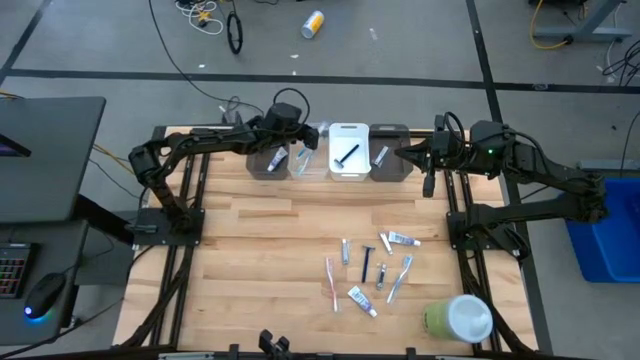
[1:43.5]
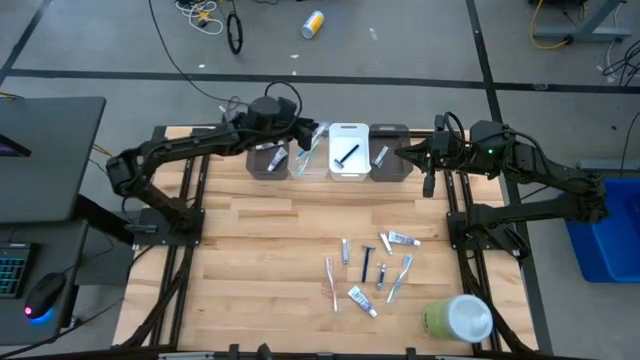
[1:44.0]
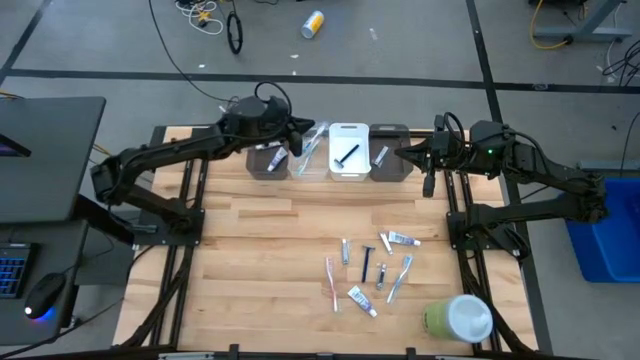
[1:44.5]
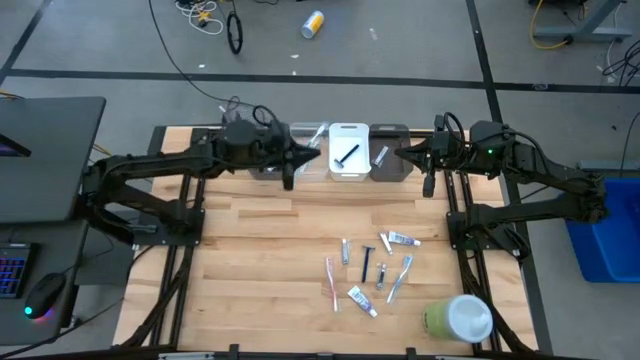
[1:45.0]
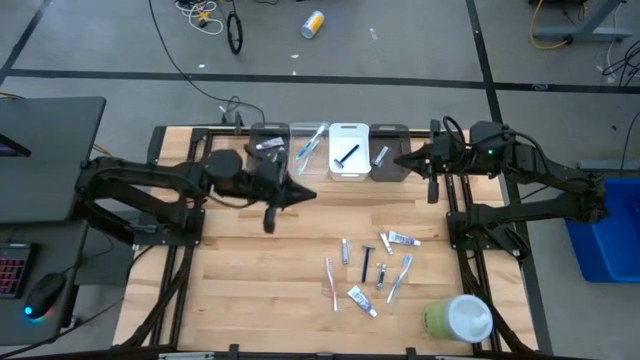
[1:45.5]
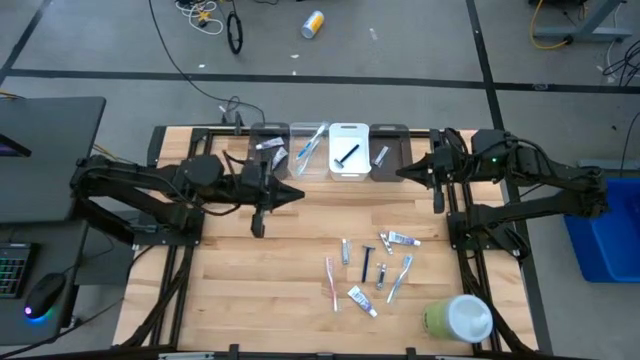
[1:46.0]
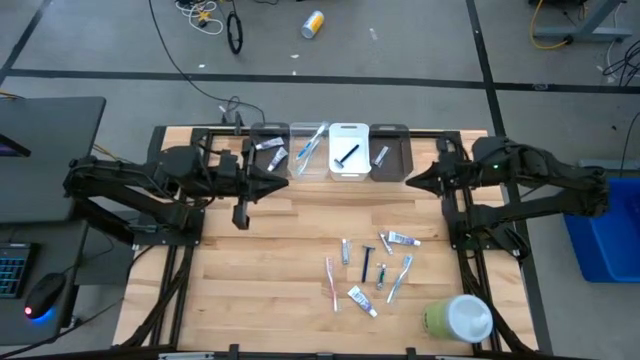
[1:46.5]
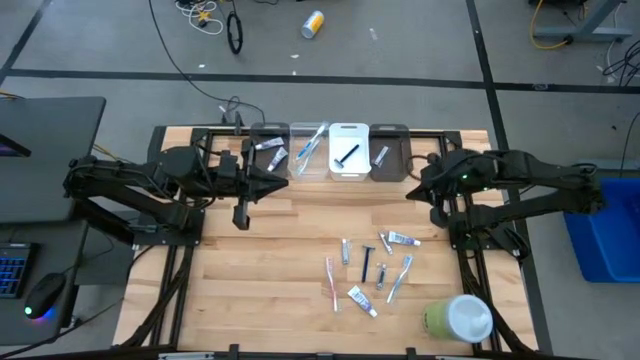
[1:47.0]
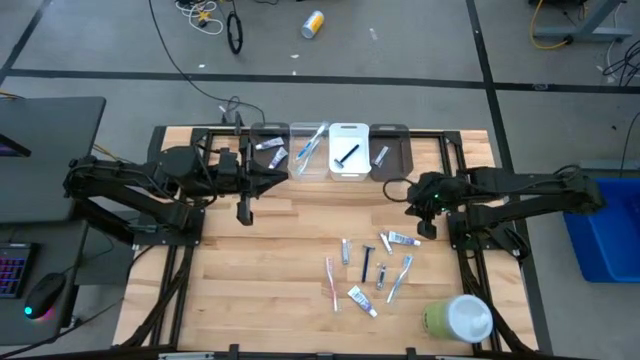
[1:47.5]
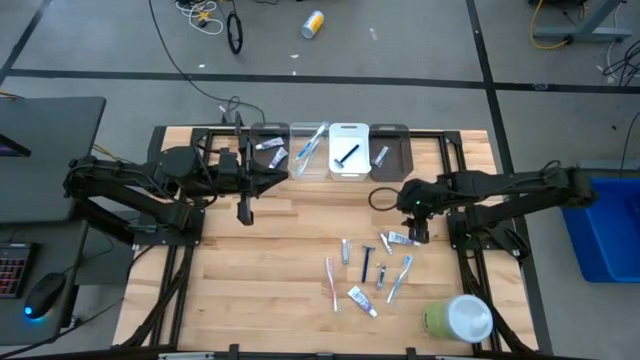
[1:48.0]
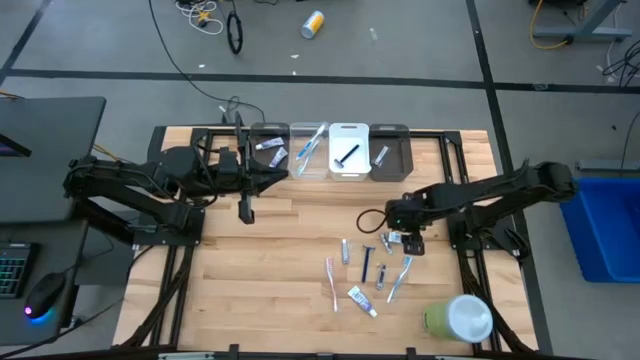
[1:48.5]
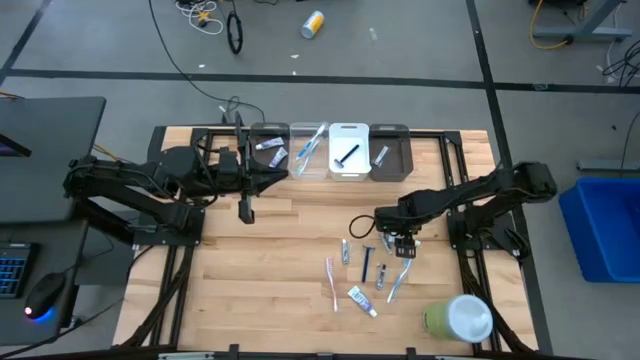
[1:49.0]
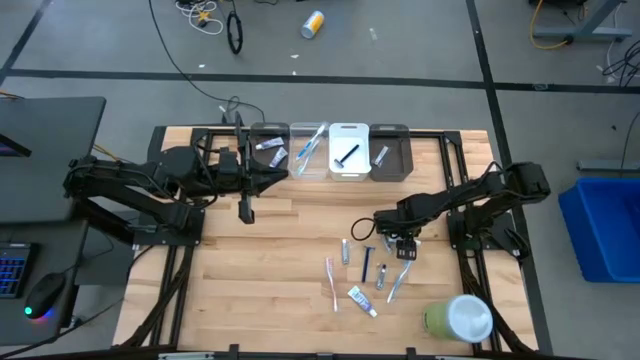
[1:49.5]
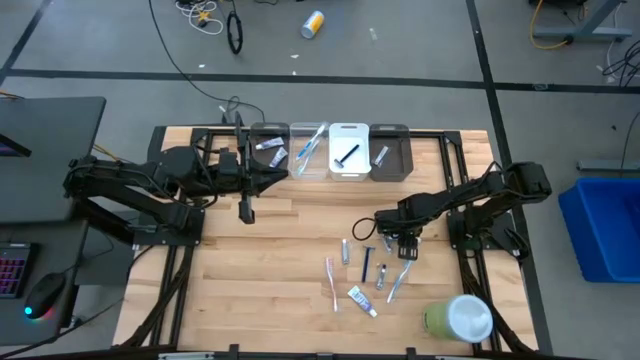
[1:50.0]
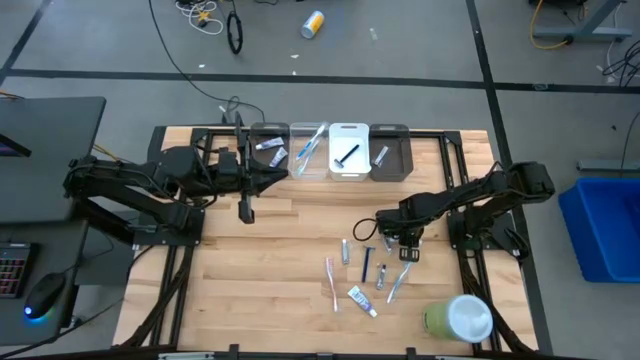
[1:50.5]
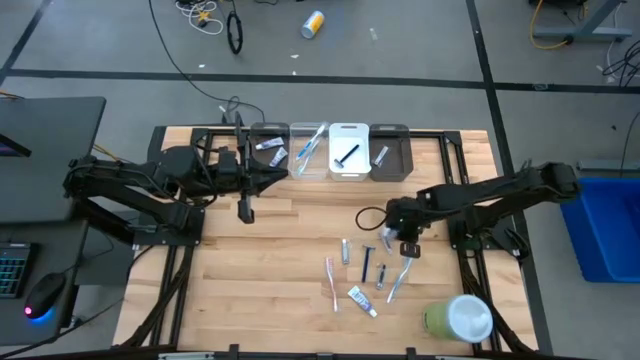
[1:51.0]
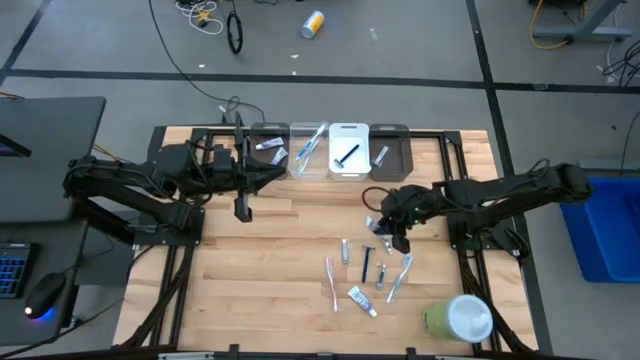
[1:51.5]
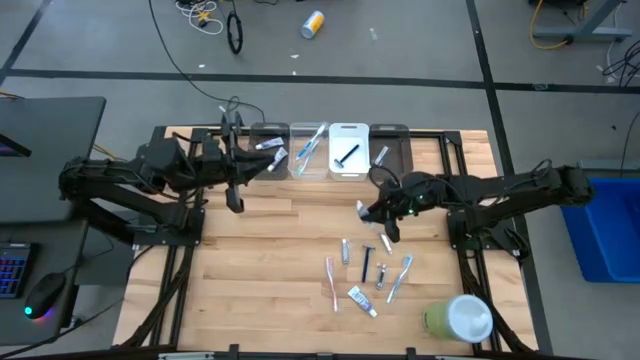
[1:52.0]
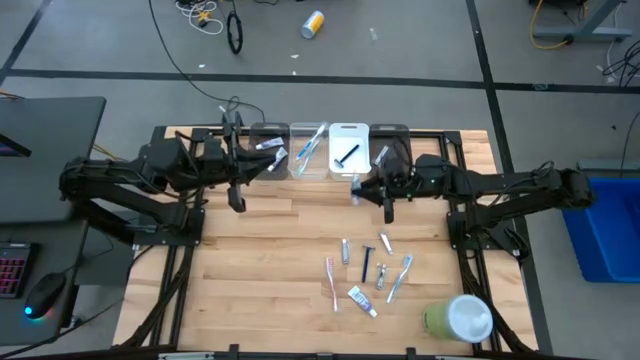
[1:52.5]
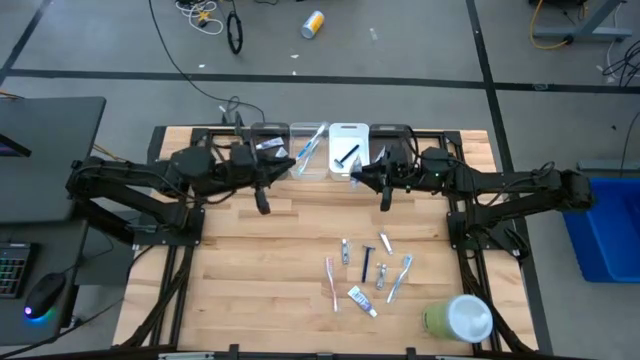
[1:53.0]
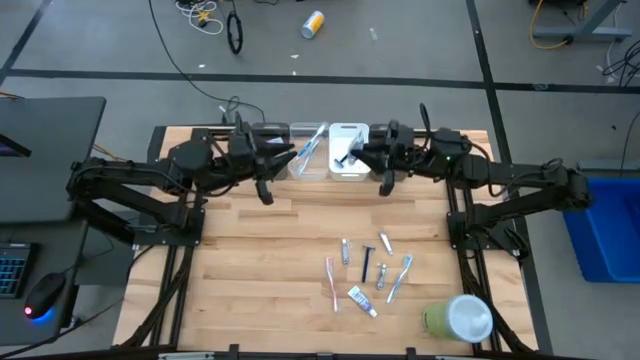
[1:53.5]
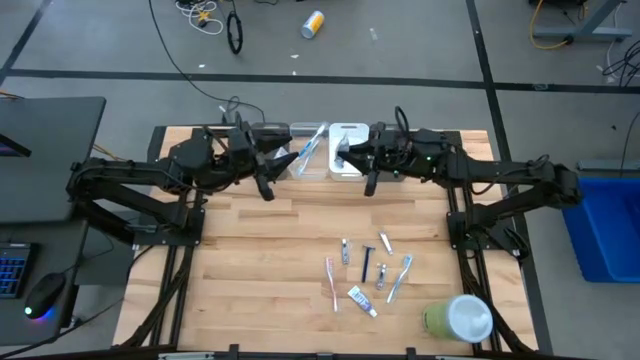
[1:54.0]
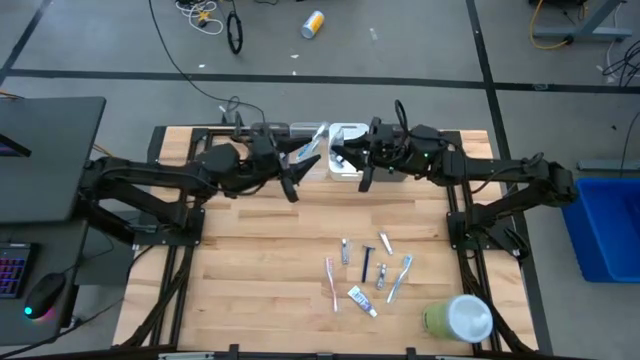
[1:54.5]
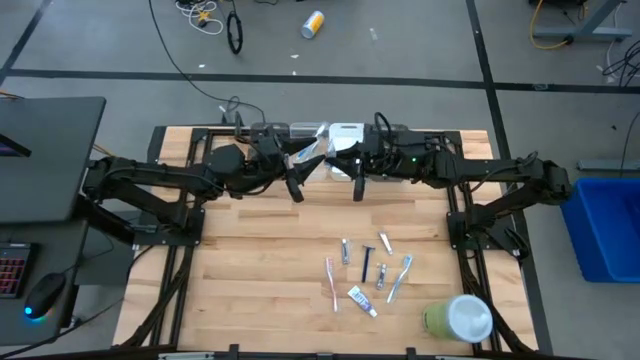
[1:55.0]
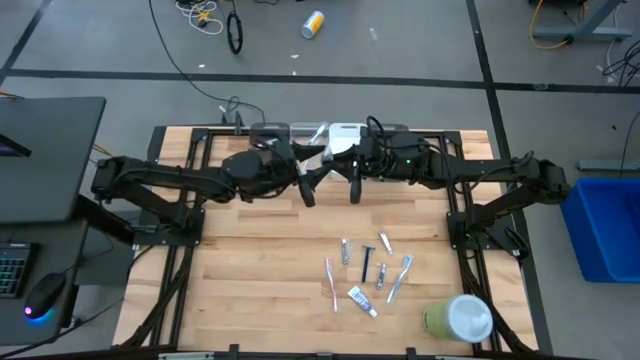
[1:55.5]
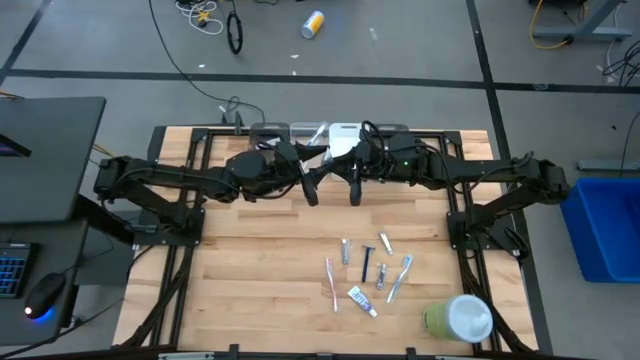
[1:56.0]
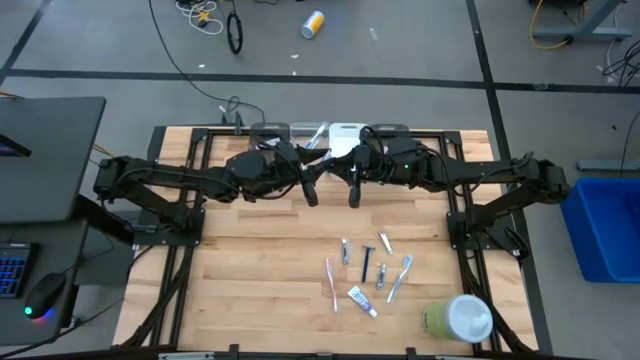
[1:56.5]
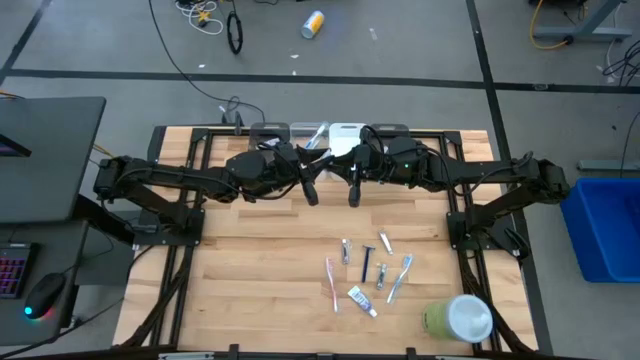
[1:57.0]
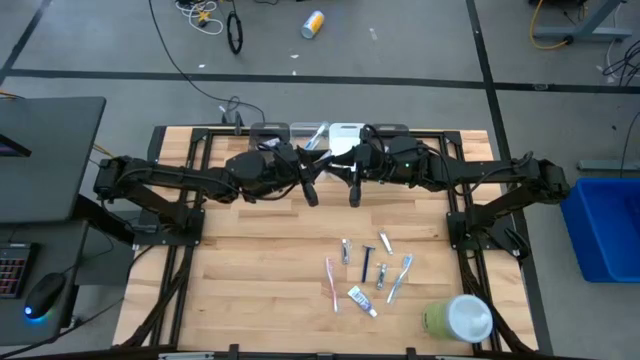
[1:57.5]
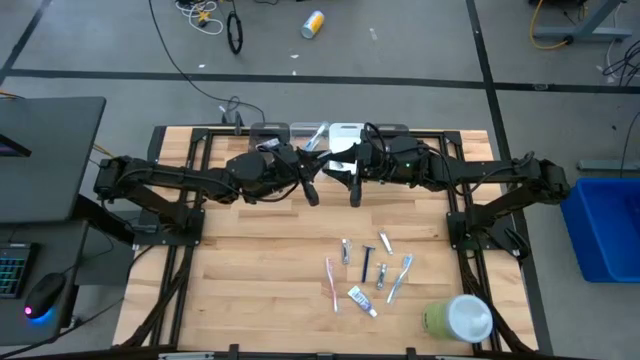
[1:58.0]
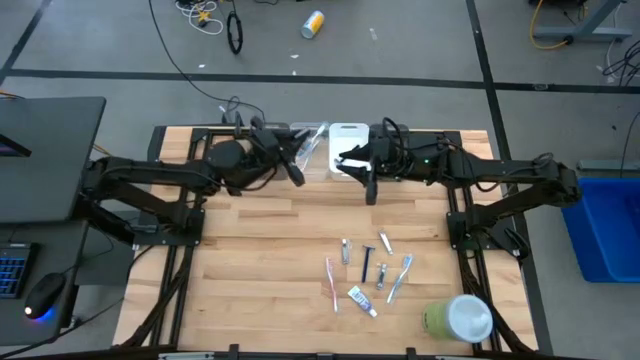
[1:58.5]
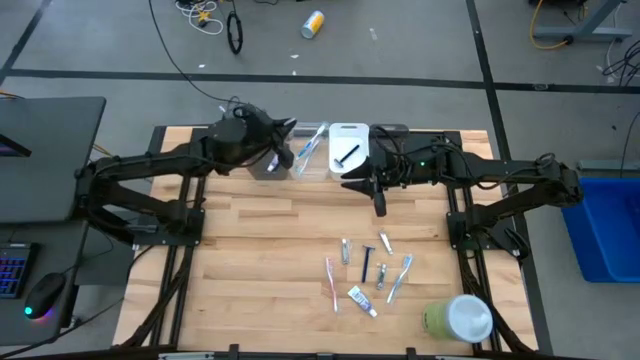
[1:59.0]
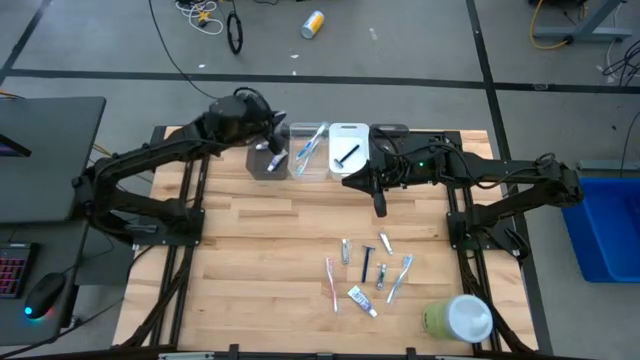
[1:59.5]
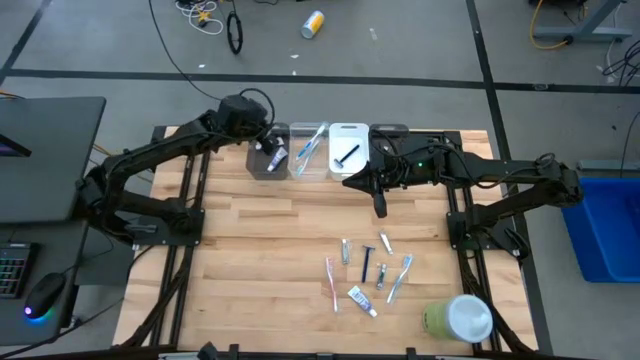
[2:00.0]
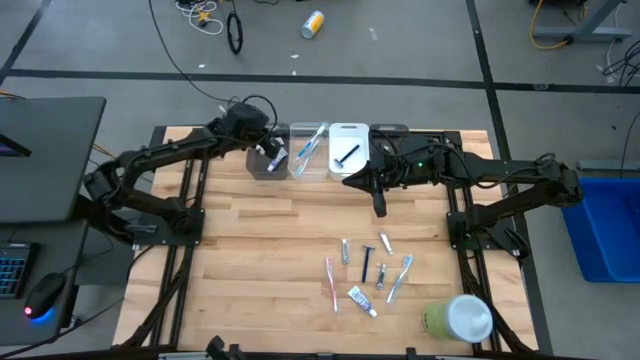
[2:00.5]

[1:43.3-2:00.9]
Task: Pick & Place Travel size toiletries
Put the white toothpaste into the left black bin

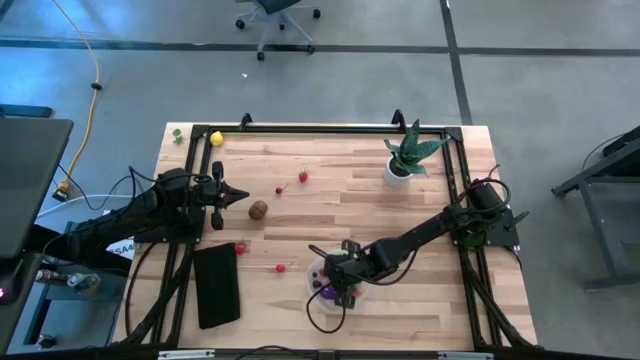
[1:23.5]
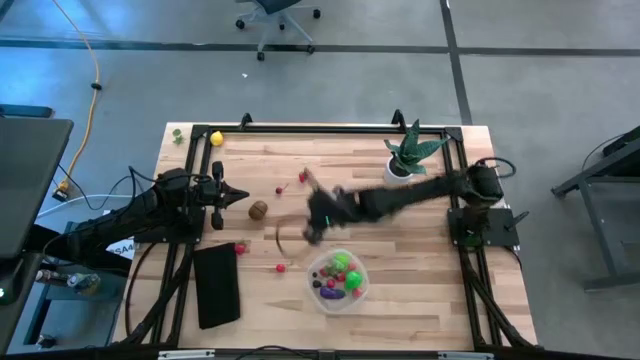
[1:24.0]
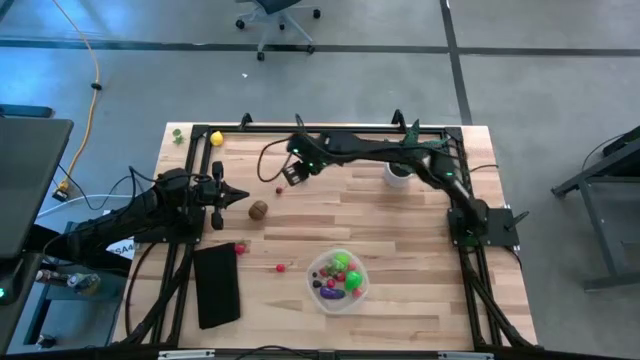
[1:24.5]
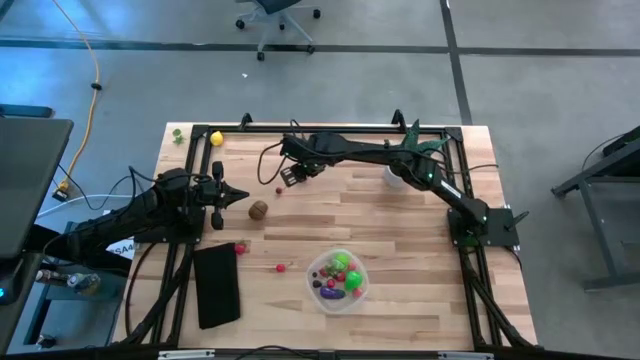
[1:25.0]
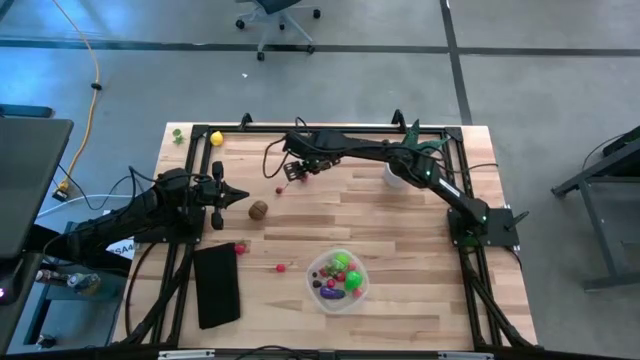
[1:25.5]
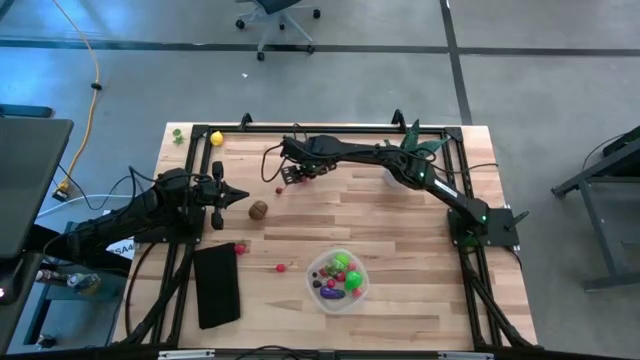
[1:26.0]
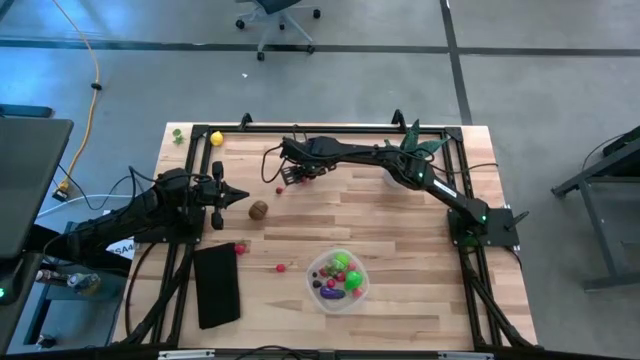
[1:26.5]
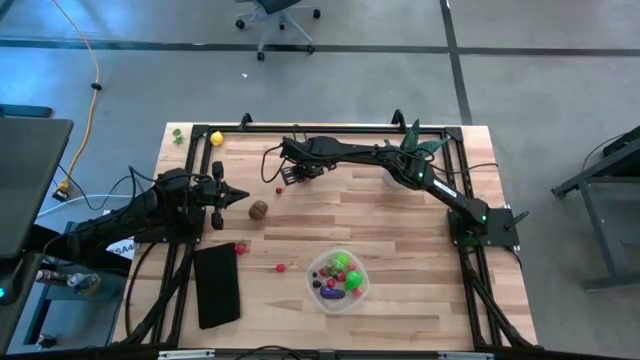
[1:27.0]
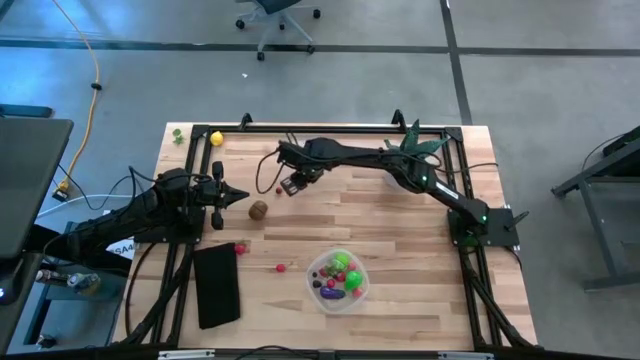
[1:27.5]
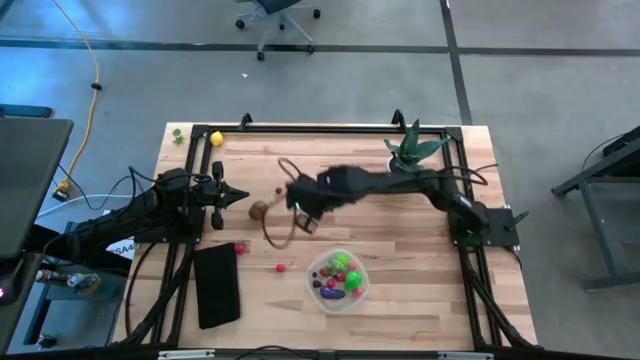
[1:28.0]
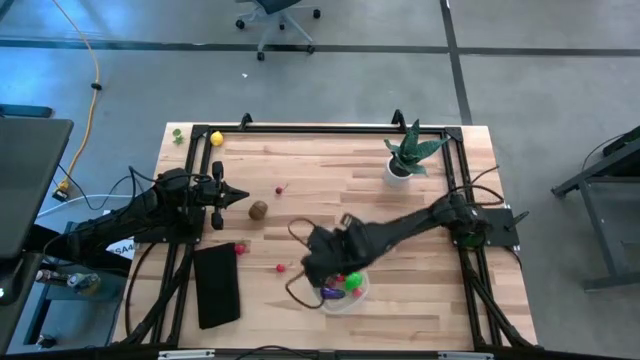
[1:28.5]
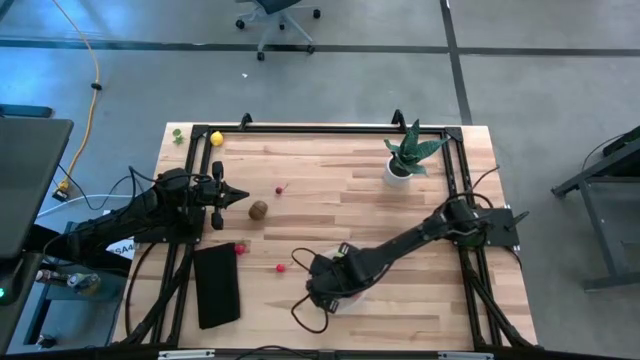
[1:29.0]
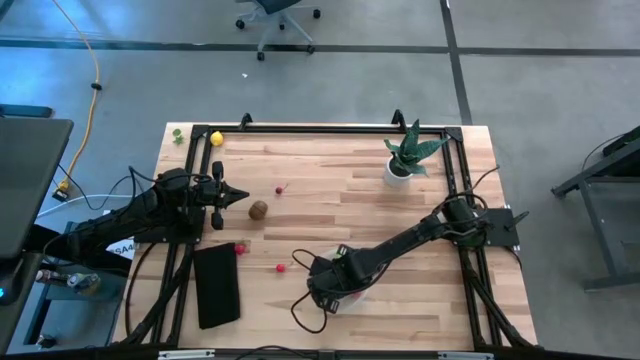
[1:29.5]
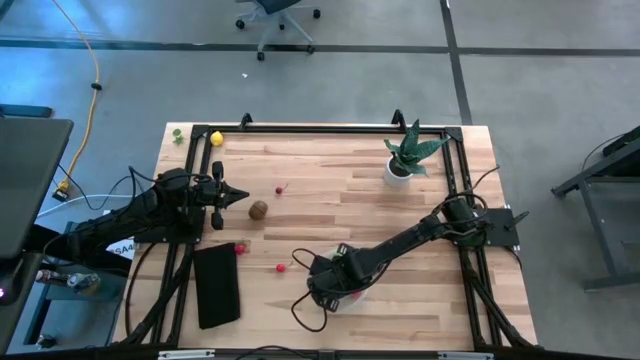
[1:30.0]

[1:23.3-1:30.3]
Task: Pick and placing Produce into tupperware
Put the red strawberry into the transparent container
